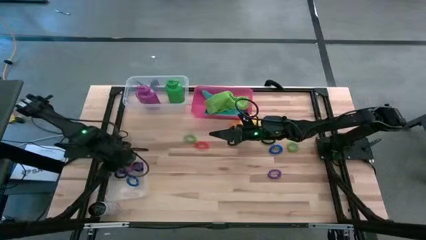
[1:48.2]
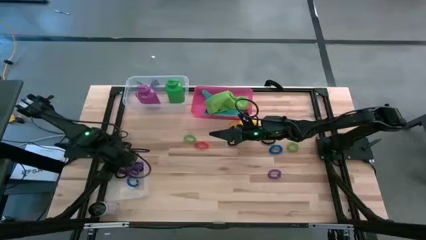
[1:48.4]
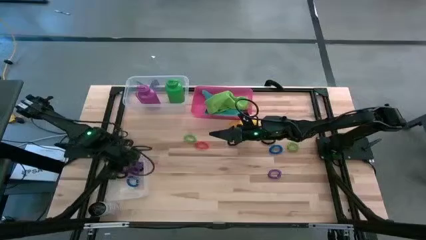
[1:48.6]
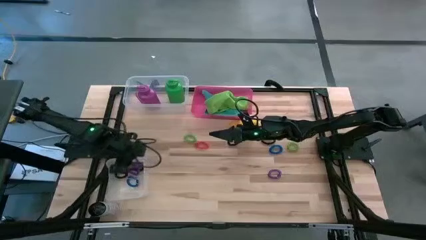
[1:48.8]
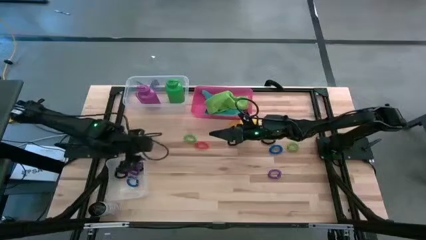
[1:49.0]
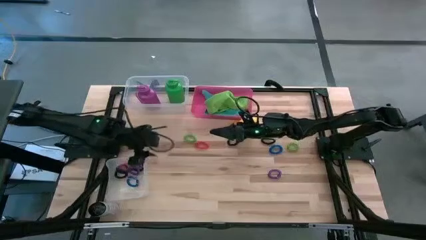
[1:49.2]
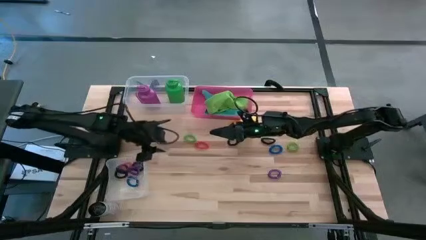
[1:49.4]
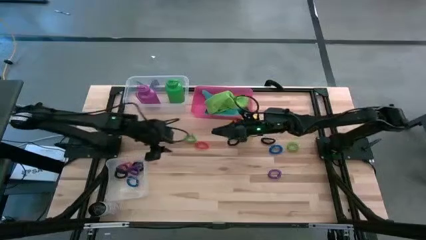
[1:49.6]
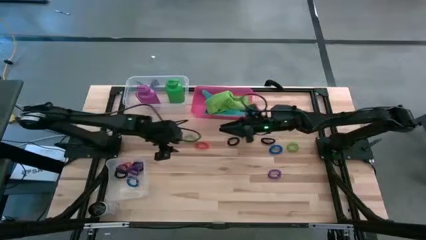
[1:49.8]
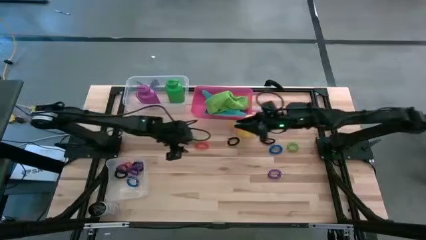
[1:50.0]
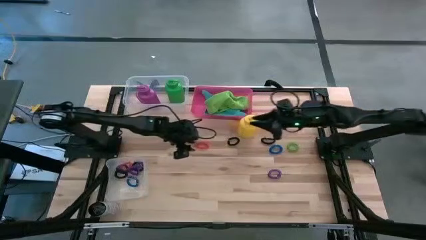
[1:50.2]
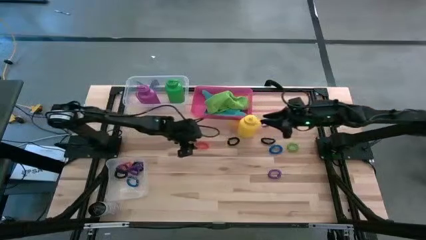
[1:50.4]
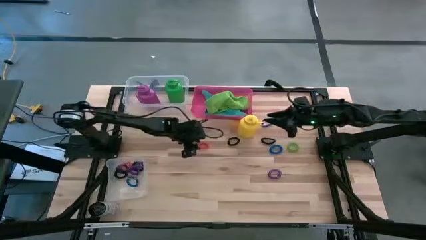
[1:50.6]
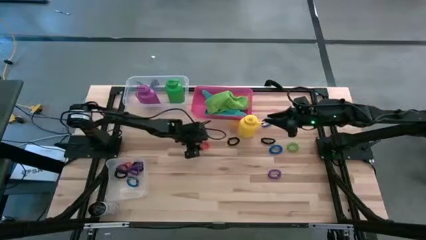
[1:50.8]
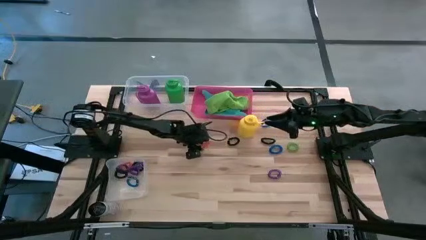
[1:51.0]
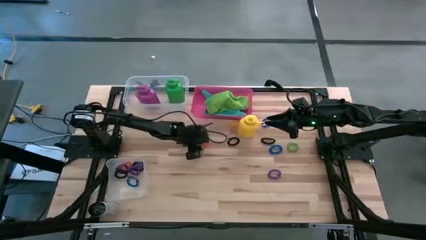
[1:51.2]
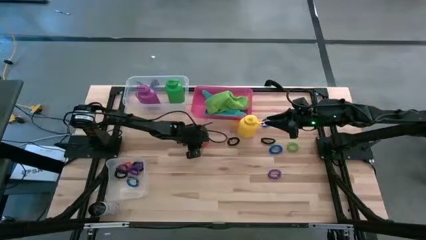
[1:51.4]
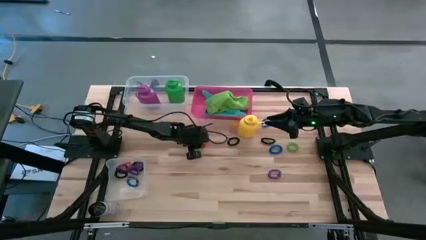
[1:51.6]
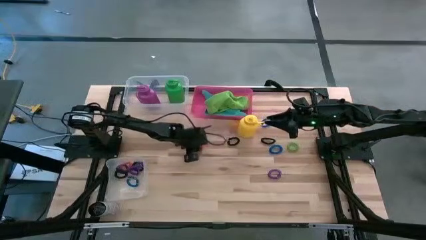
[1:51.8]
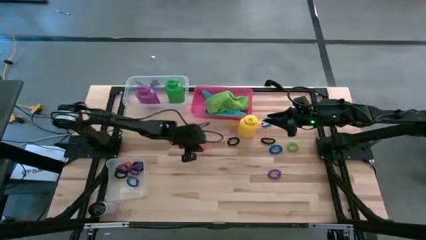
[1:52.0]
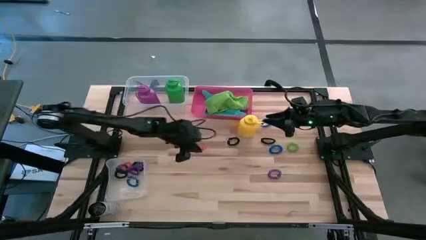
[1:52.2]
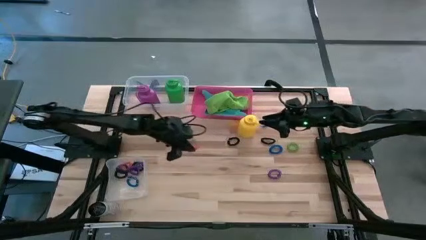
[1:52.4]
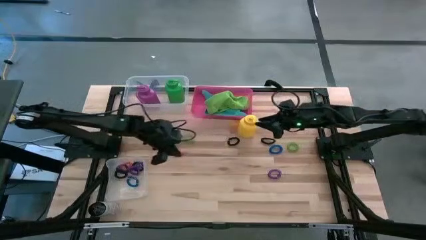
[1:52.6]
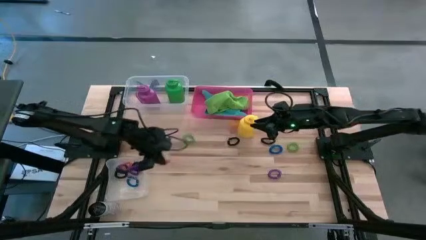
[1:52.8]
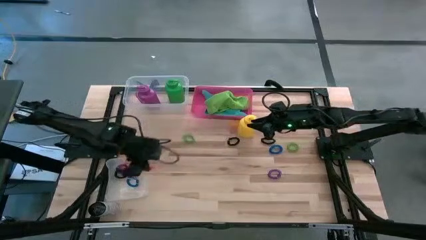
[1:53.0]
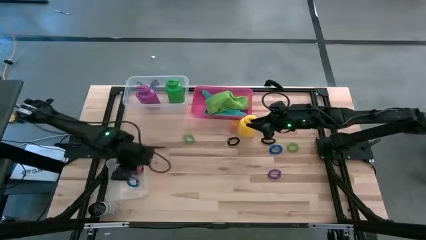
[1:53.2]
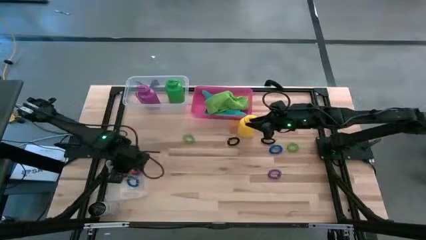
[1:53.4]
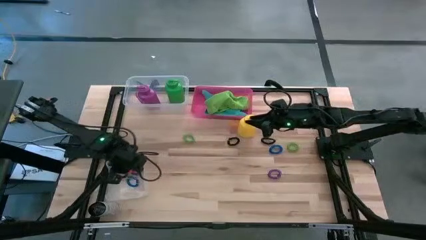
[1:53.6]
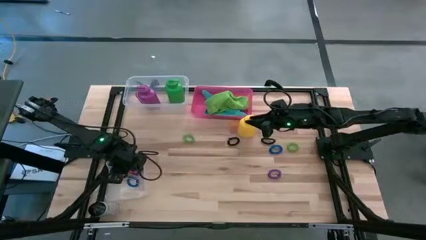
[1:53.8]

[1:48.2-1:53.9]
Task: Pick & Place Sports Items
Put the orange spring keychain into the bottom transparent bin

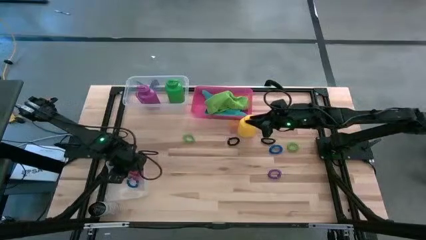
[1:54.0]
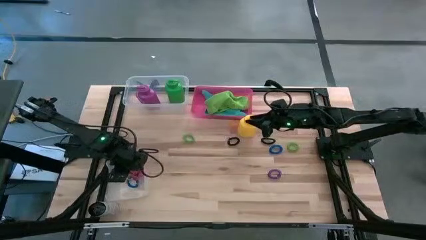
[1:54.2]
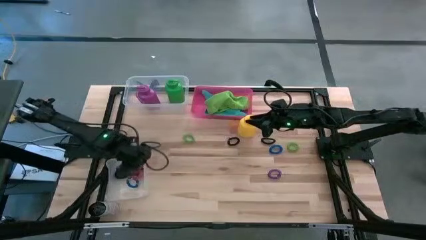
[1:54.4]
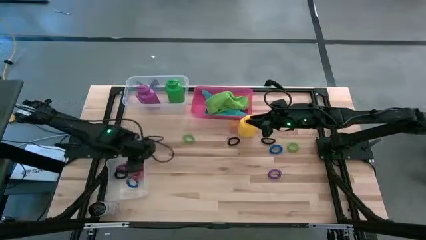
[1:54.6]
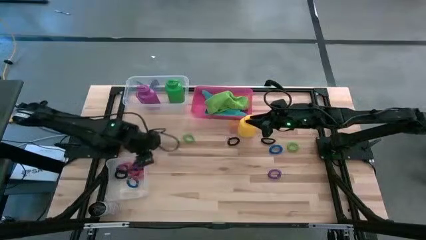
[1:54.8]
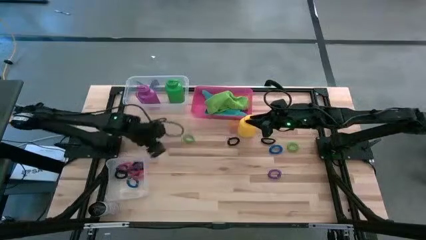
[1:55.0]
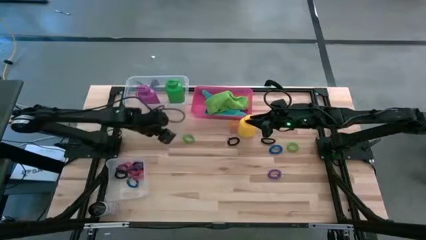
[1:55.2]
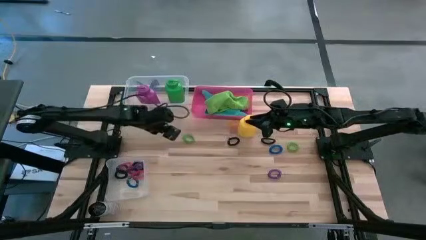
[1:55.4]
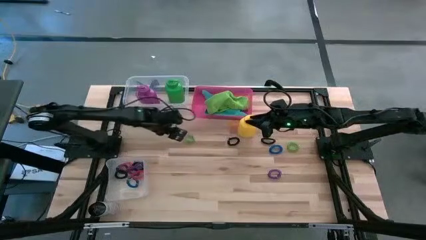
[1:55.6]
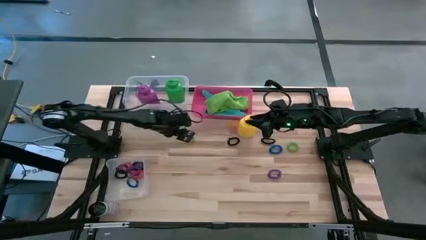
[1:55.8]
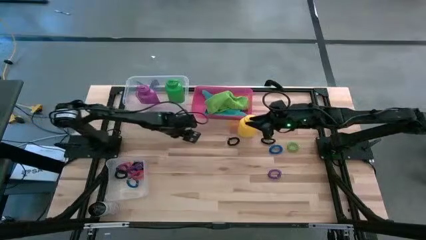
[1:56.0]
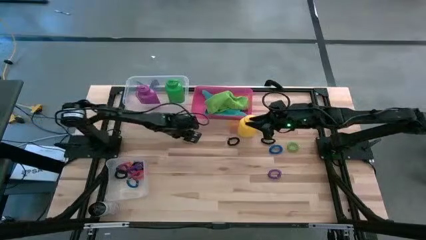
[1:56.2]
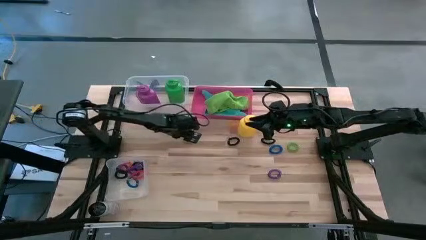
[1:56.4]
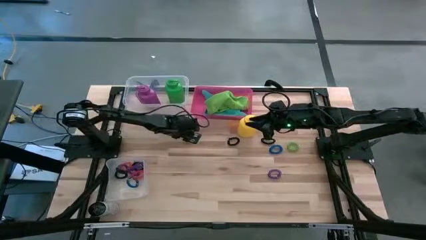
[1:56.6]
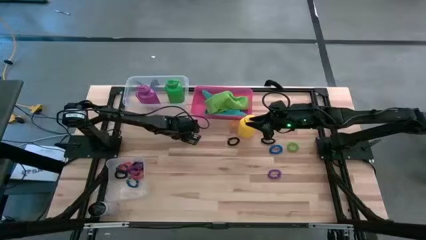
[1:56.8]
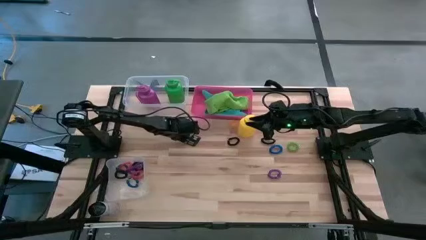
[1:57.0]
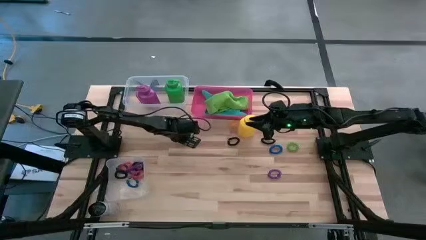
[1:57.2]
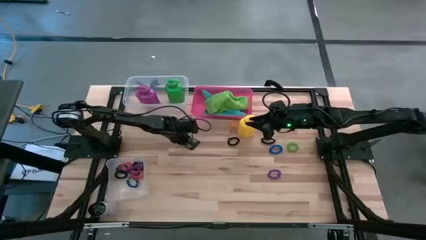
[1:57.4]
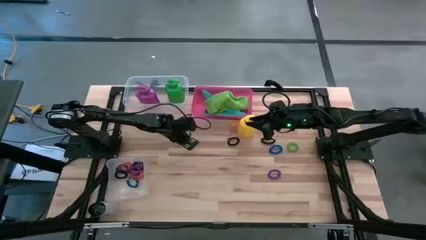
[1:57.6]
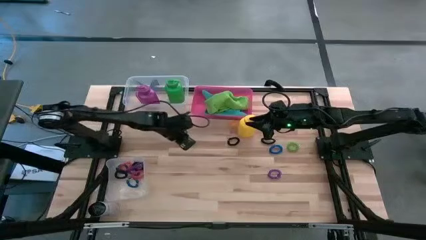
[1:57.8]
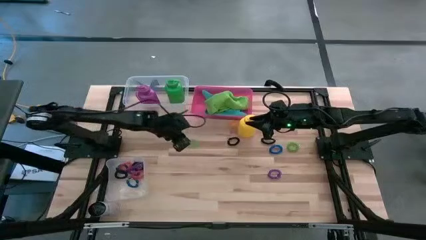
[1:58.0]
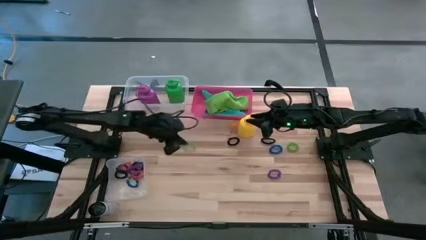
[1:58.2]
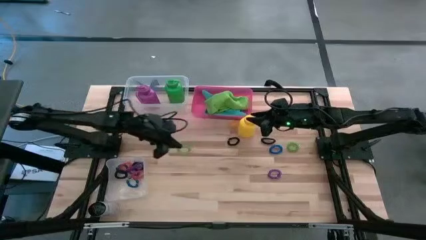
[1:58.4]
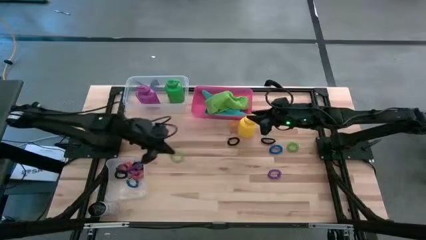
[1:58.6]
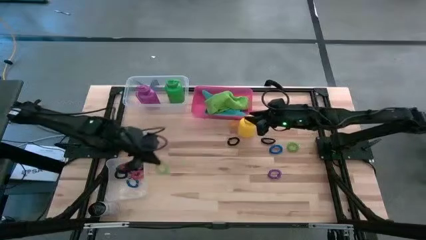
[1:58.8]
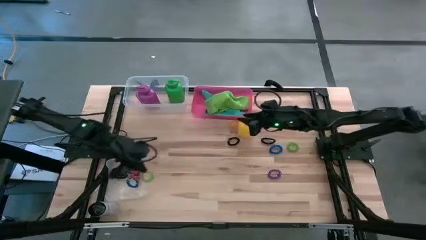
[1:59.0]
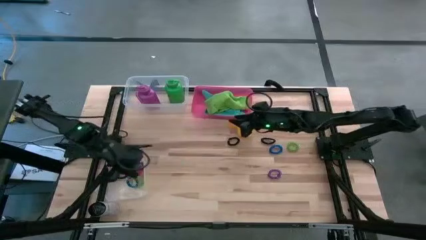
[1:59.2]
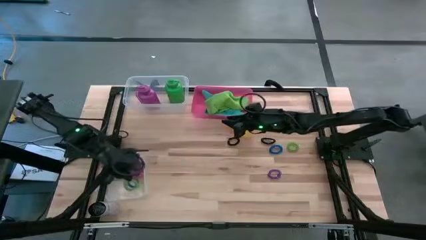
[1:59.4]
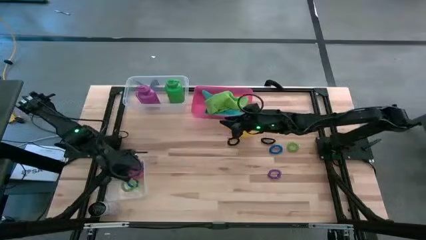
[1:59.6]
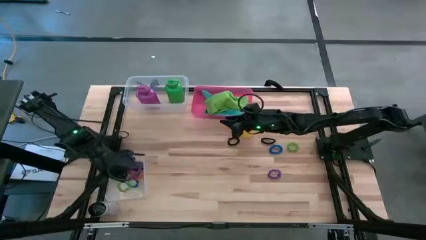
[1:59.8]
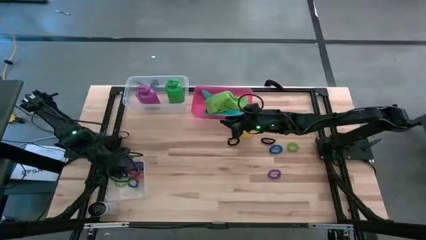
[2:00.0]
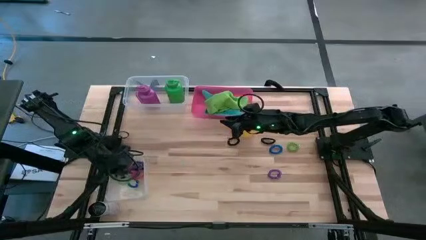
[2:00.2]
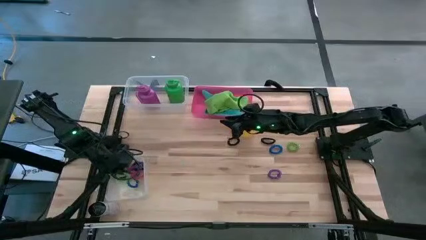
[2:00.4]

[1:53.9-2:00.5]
Put the green spring keychain into the bottom transparent bin

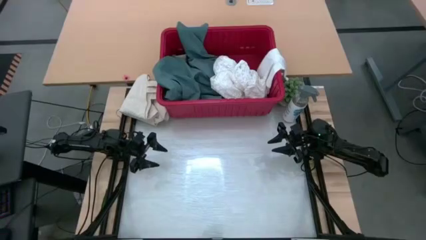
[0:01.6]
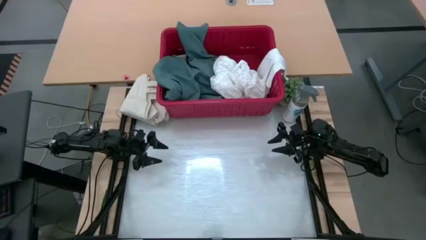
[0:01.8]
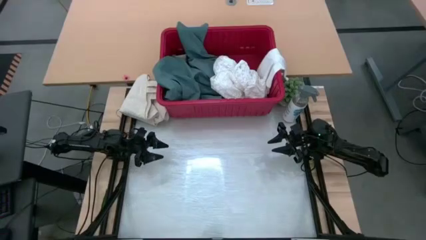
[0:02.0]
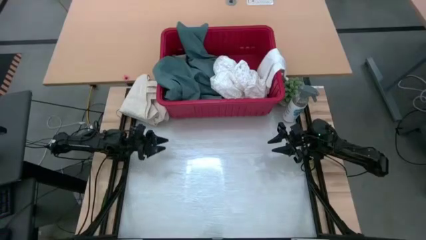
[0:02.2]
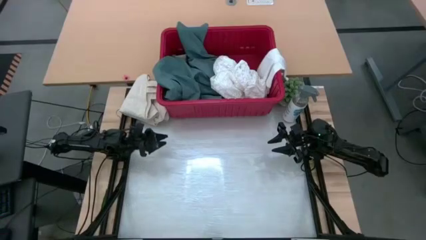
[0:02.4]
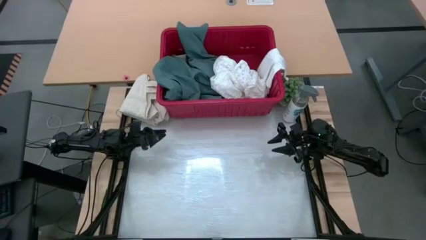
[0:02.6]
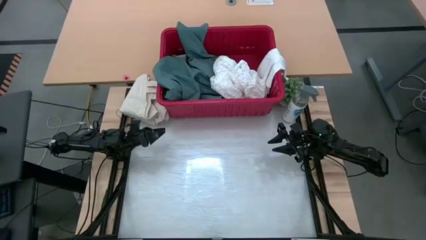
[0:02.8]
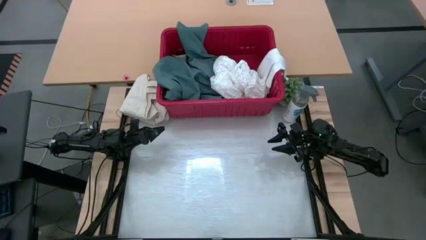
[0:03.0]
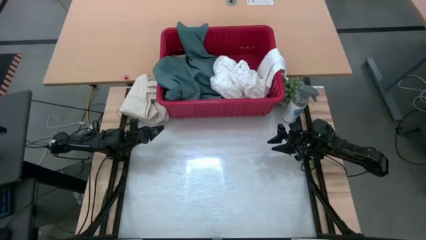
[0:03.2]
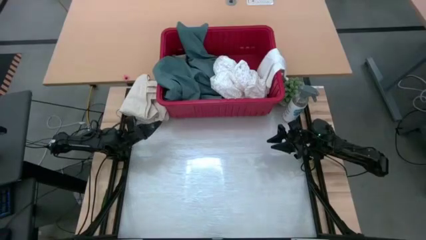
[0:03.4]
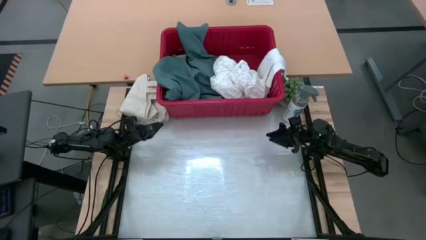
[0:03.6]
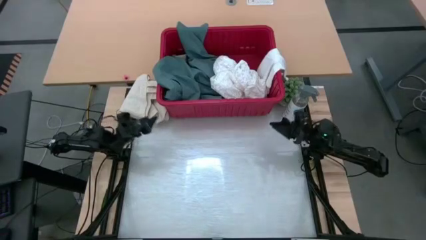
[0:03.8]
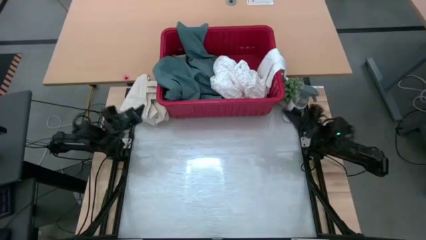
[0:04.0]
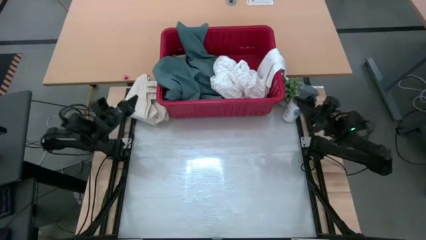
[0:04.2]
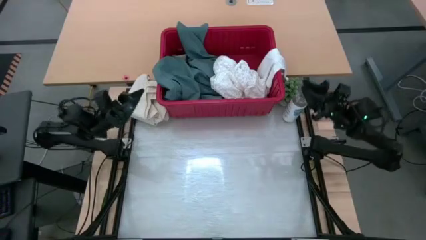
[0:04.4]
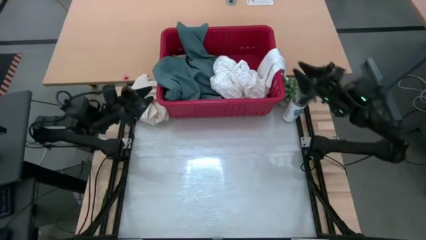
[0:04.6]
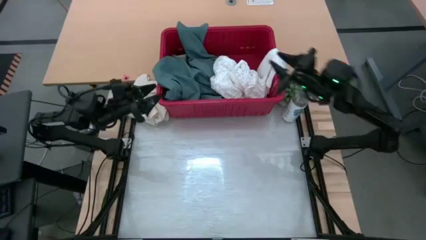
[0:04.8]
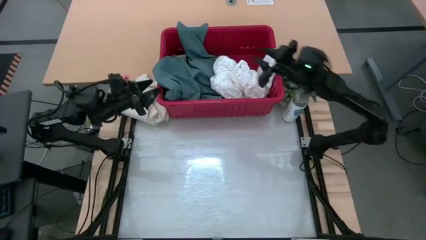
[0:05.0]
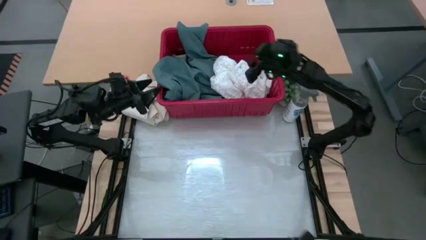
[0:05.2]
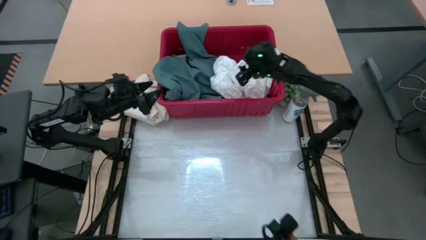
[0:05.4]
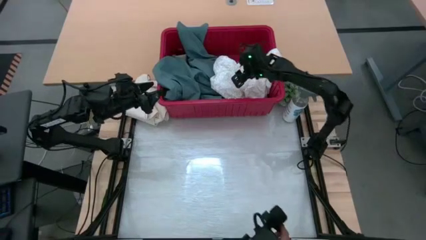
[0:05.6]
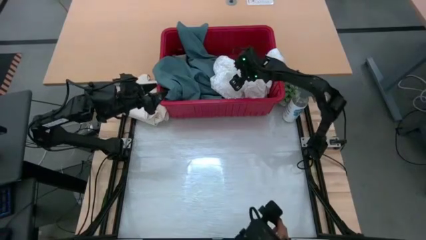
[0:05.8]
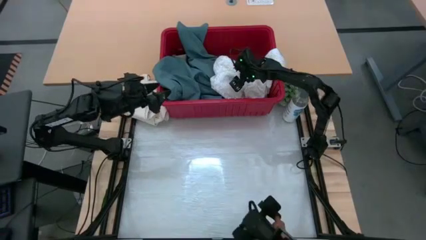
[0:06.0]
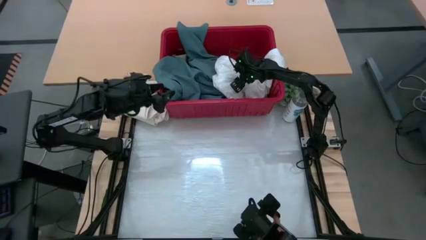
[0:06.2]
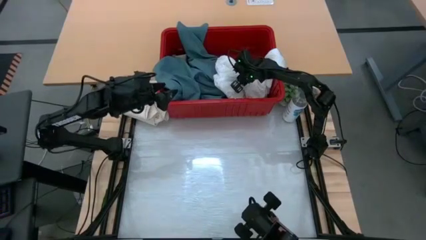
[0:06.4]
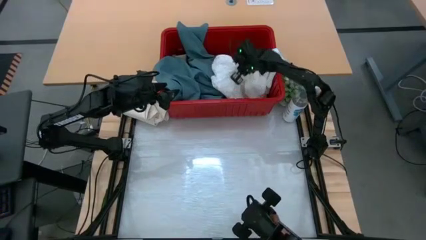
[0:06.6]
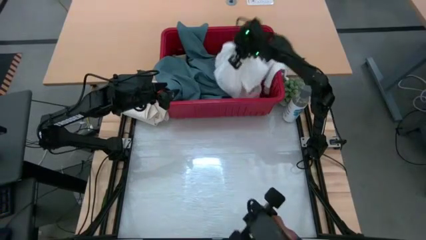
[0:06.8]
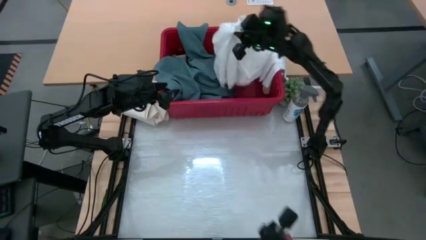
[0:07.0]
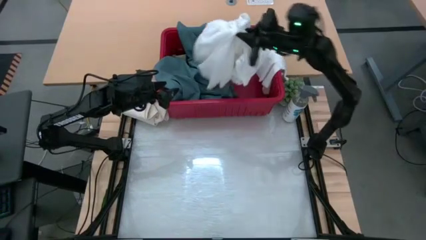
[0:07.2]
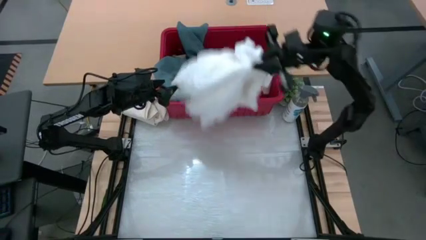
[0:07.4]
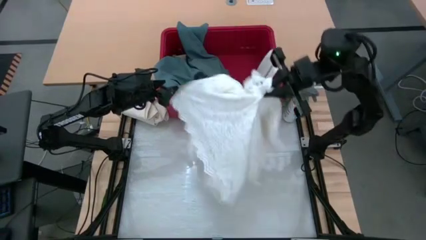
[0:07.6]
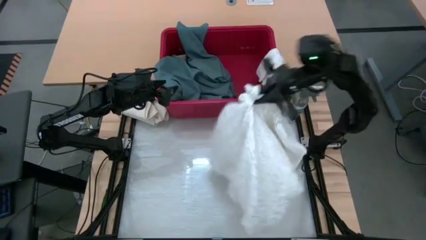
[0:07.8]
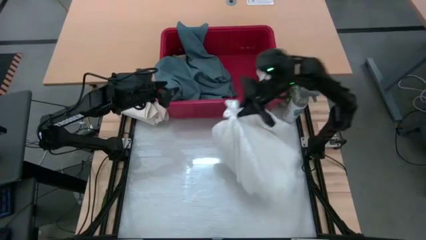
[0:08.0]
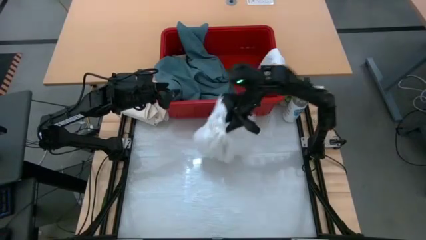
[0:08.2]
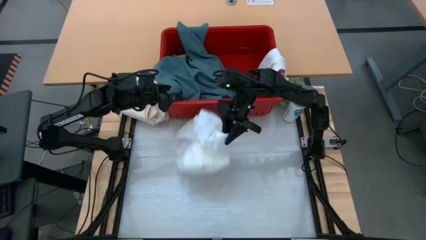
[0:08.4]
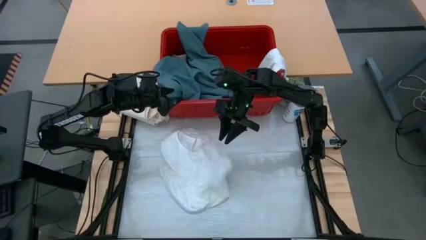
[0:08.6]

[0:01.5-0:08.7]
Task: Fold Laundry from Bin
Put the white shirt in the center of the table
